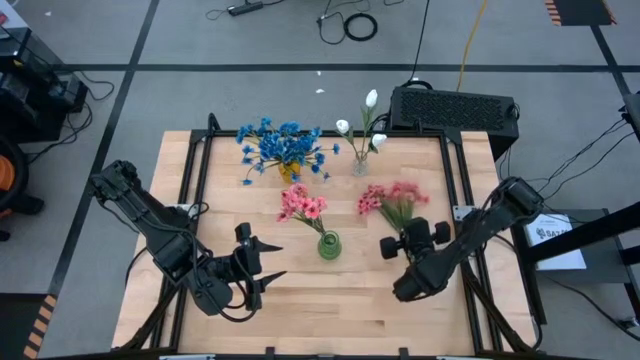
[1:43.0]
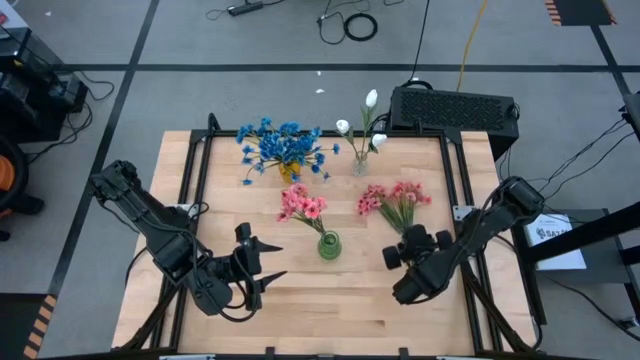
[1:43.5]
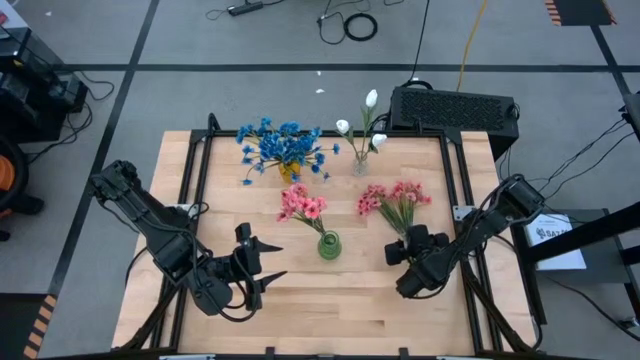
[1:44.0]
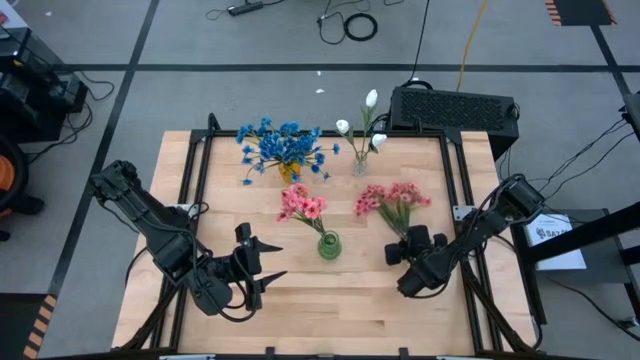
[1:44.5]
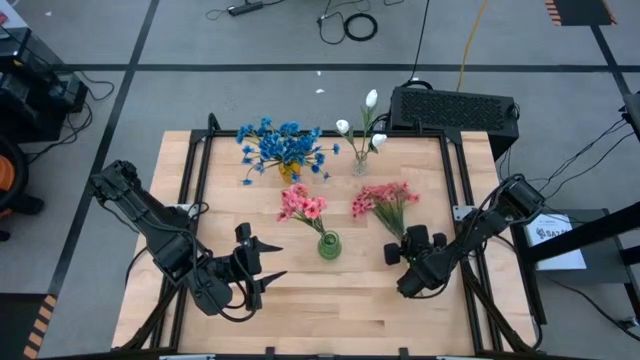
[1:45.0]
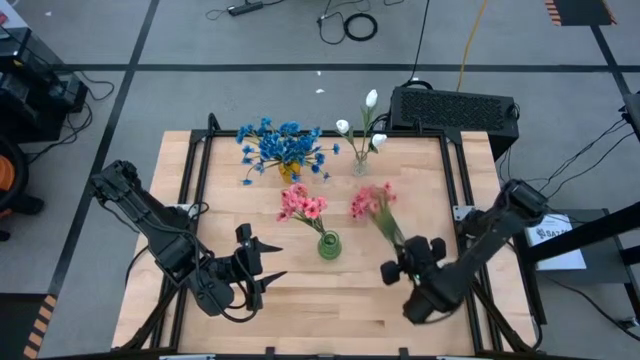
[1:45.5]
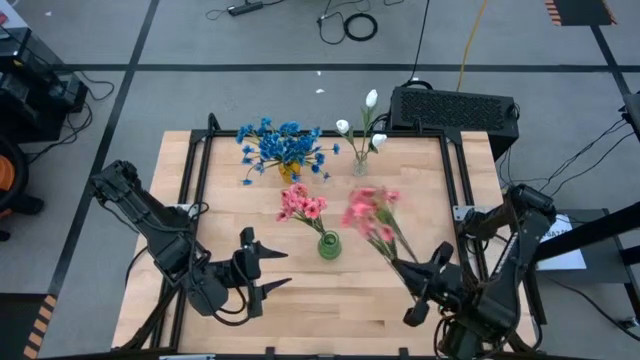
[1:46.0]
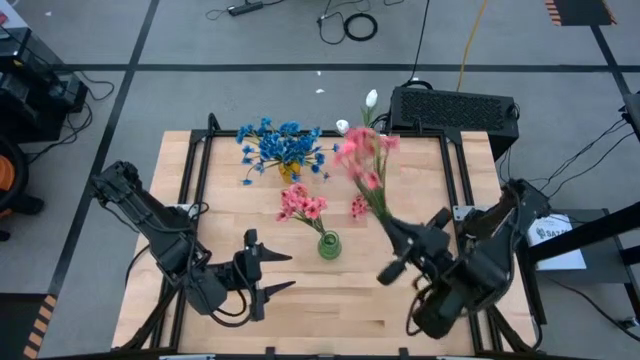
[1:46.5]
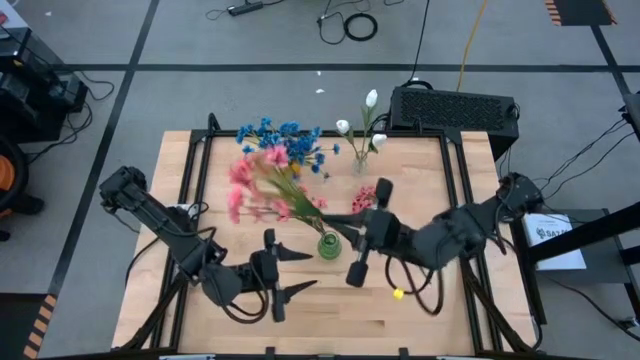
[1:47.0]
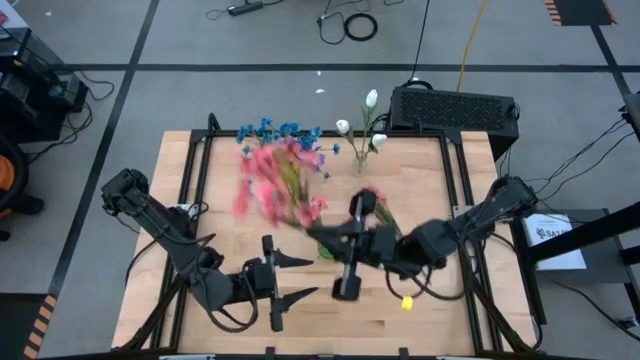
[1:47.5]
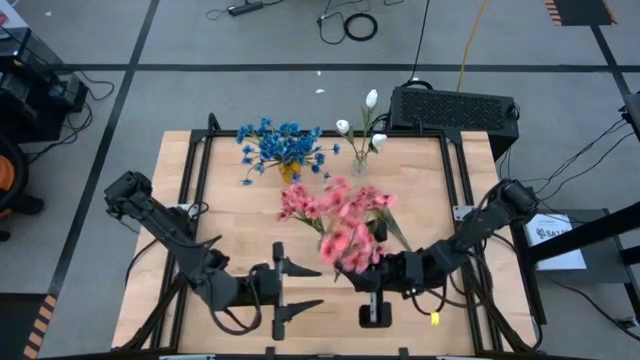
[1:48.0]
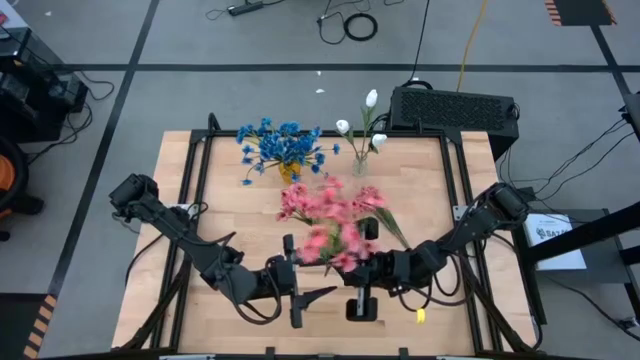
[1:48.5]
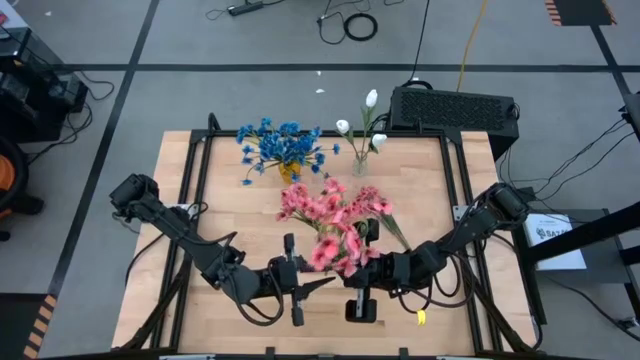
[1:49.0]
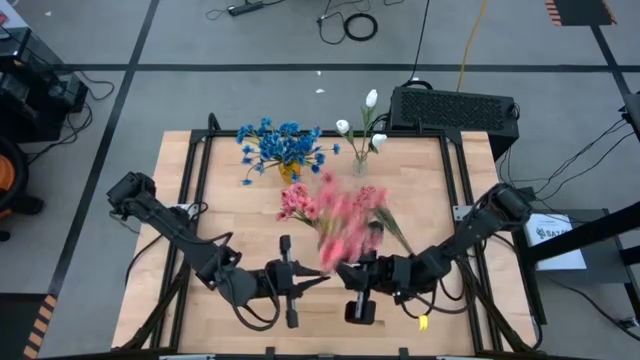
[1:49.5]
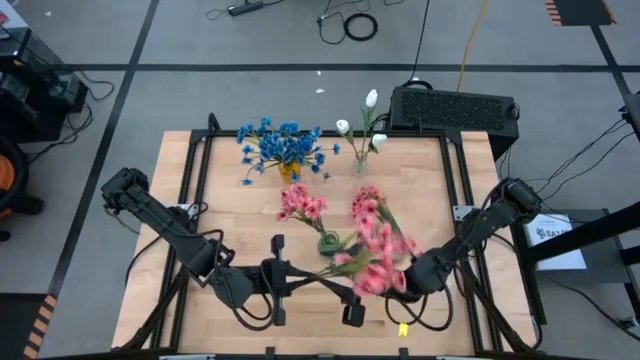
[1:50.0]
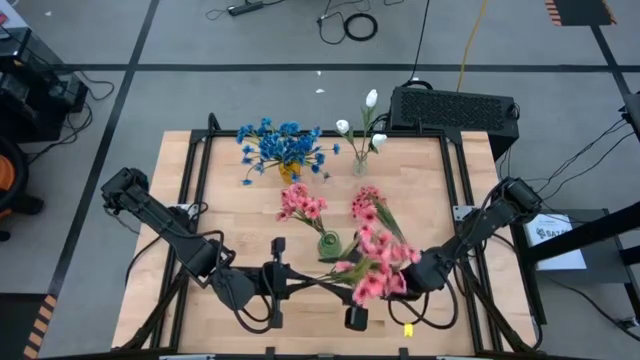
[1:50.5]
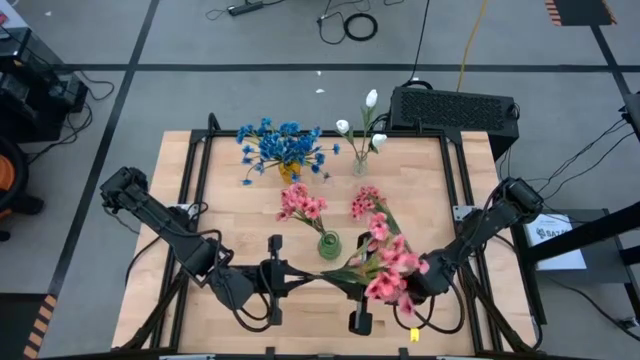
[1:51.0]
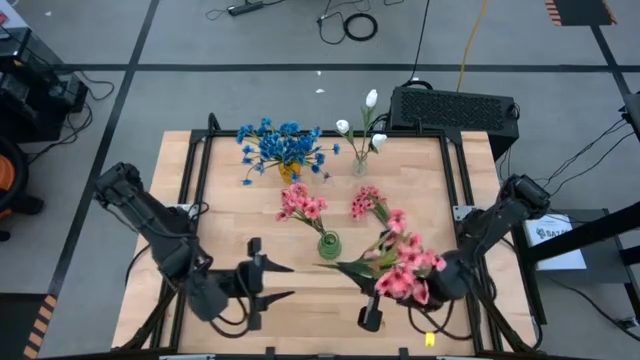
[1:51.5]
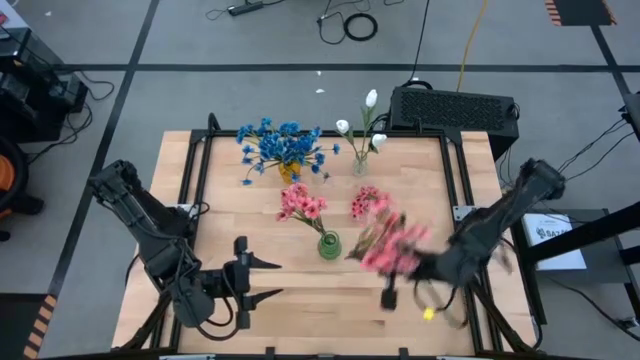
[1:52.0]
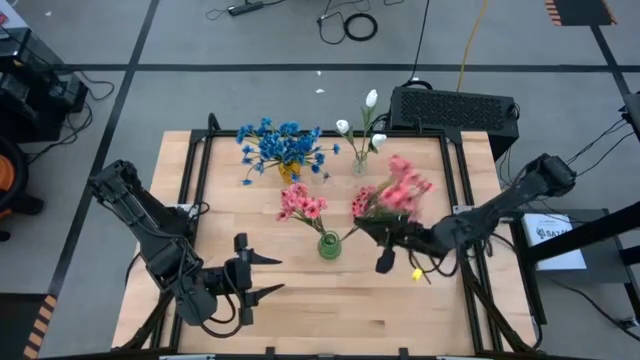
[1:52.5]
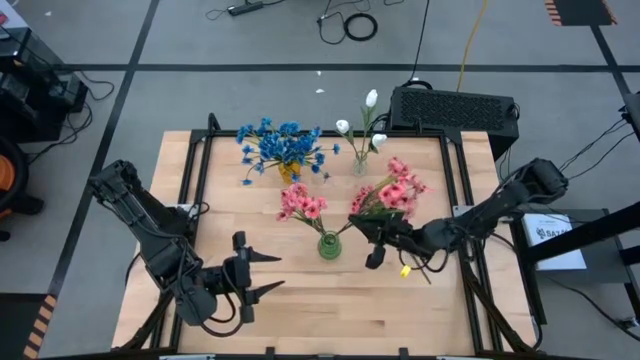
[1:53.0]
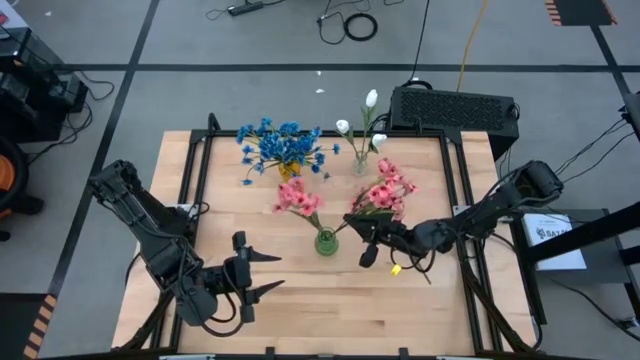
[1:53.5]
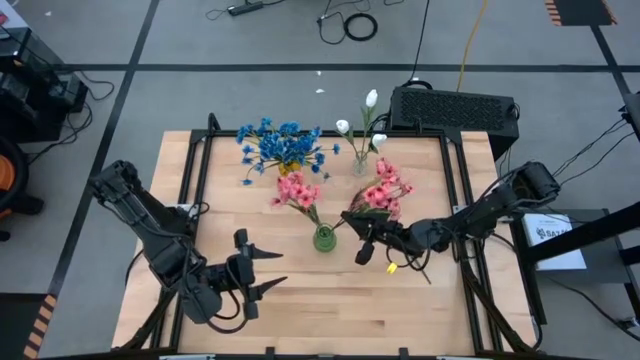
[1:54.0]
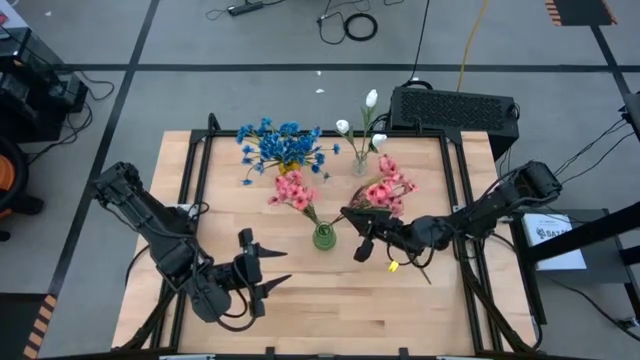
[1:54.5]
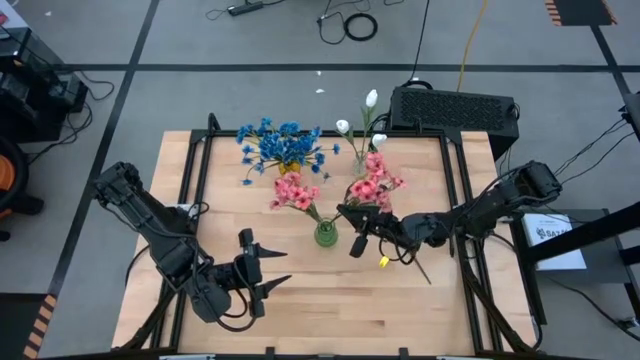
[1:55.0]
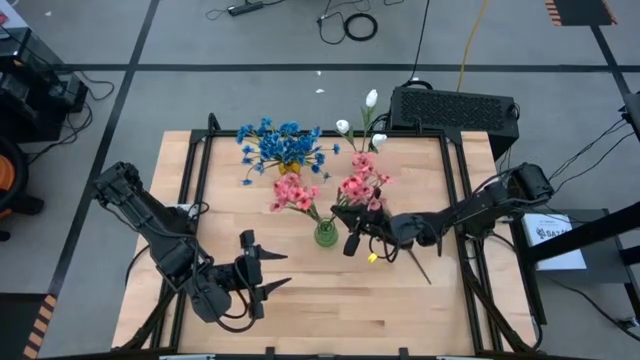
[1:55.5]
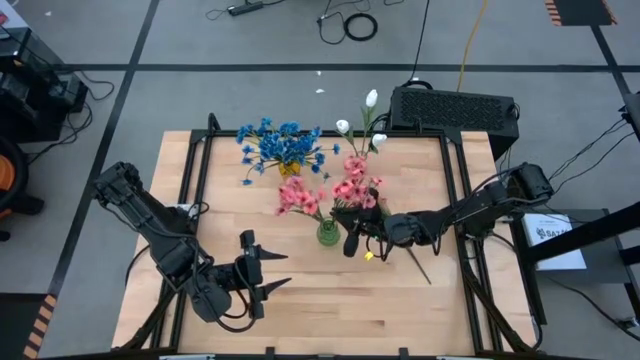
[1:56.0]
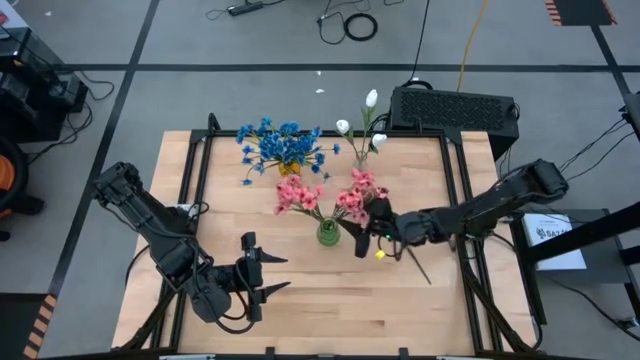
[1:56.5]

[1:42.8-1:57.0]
Task: Sort flowers into vase by color
Put the right pink flowers into the green vase

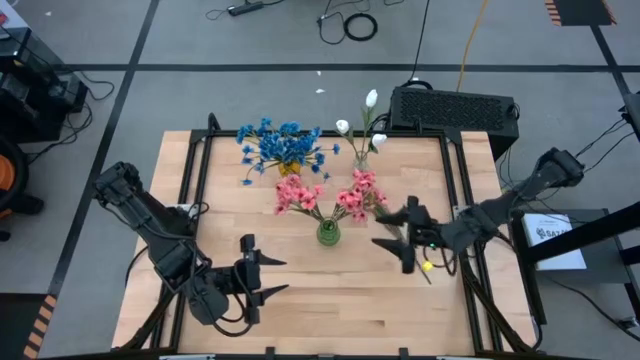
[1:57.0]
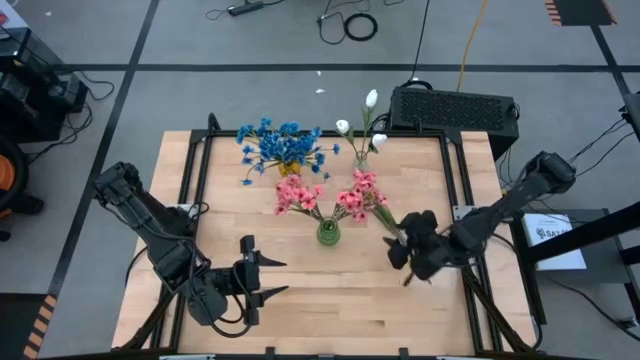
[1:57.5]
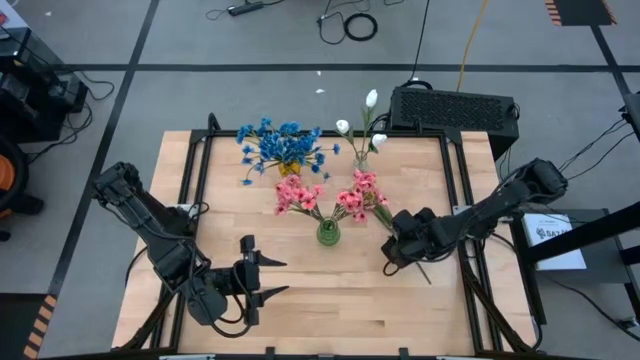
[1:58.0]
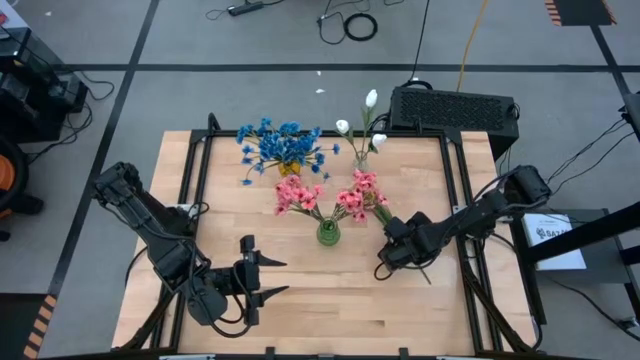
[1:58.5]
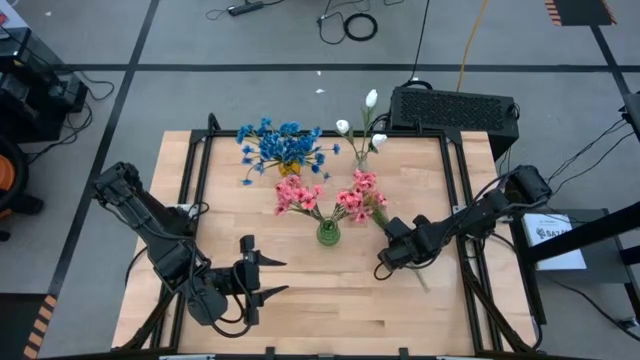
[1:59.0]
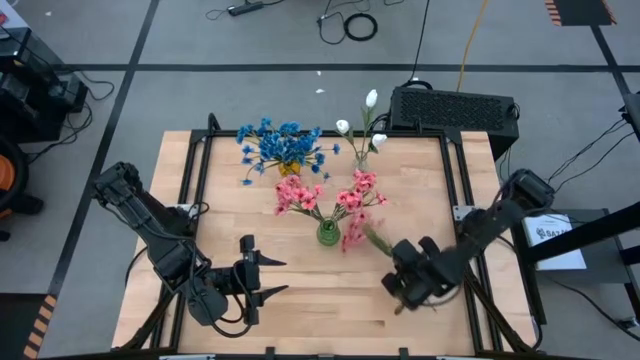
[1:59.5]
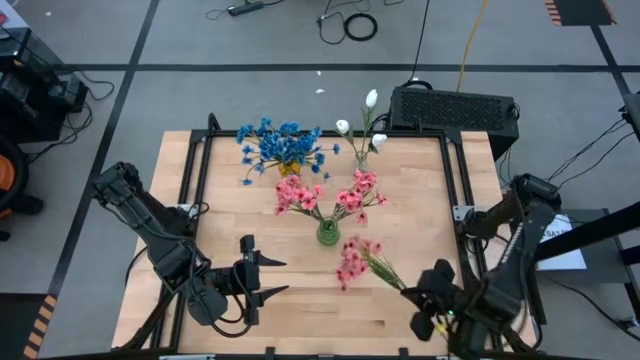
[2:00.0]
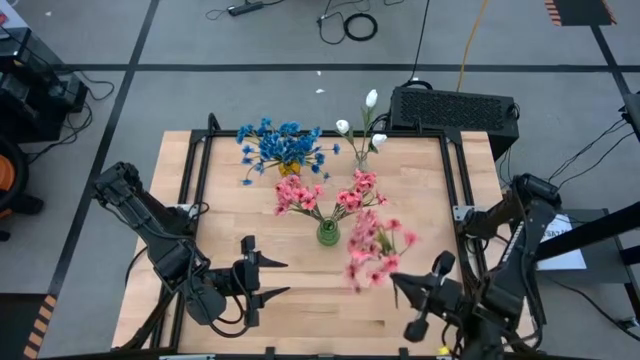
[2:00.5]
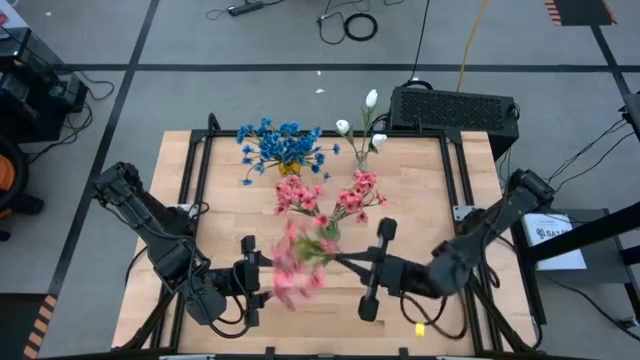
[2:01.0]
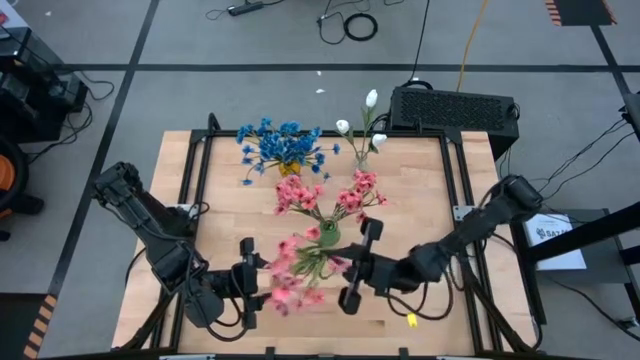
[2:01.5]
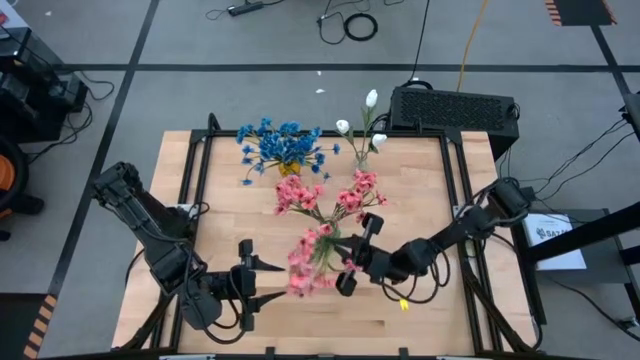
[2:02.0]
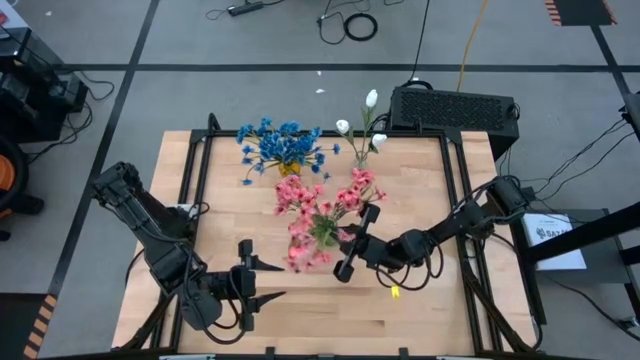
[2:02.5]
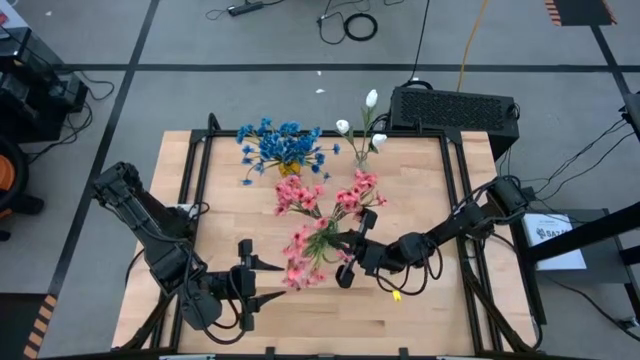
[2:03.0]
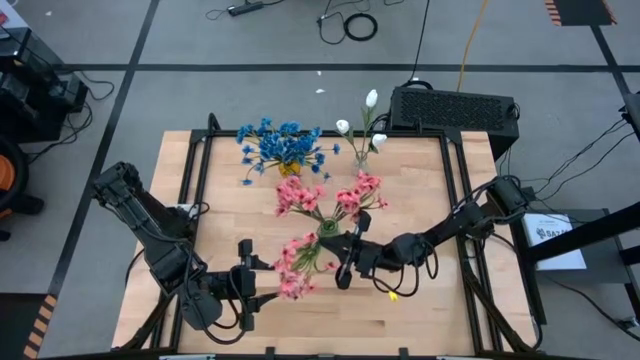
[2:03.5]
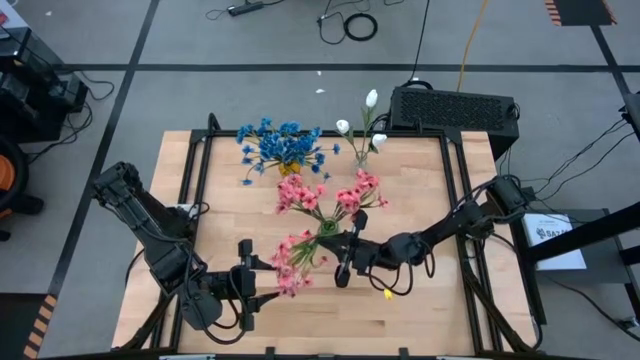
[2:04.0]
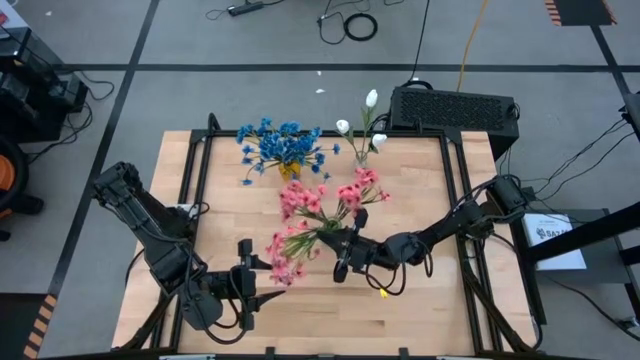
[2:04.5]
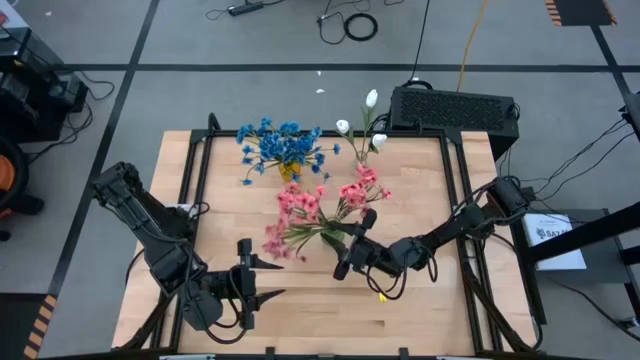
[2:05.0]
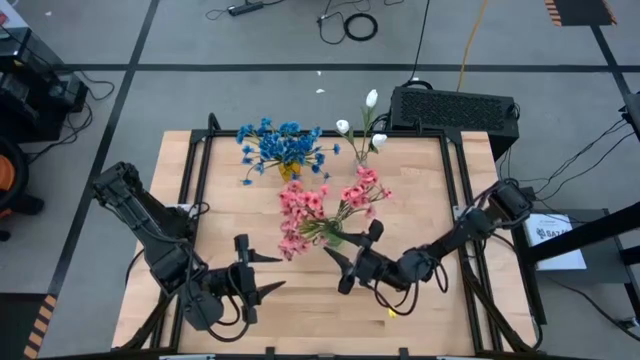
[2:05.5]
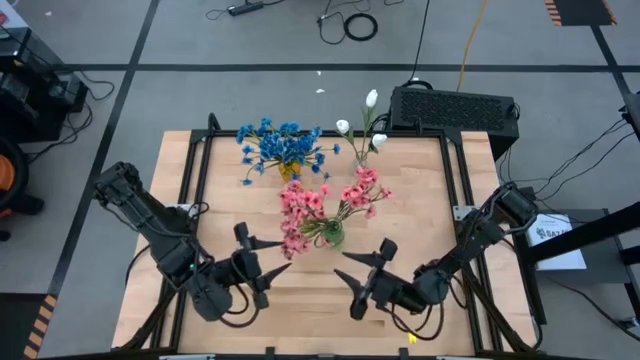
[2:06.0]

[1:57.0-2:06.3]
Put the pink flower into the green vase
